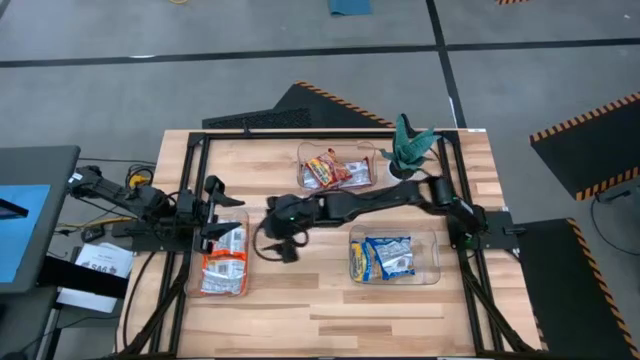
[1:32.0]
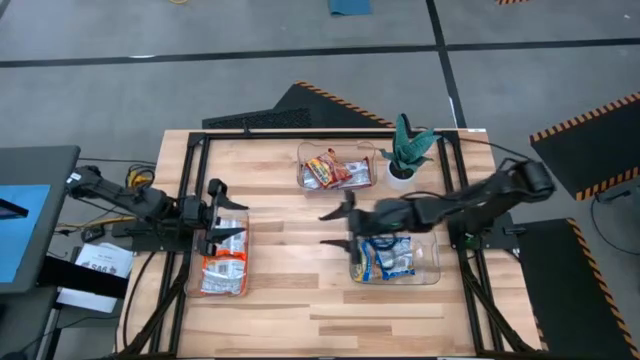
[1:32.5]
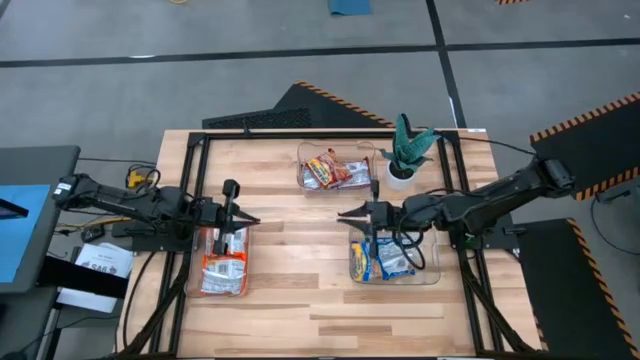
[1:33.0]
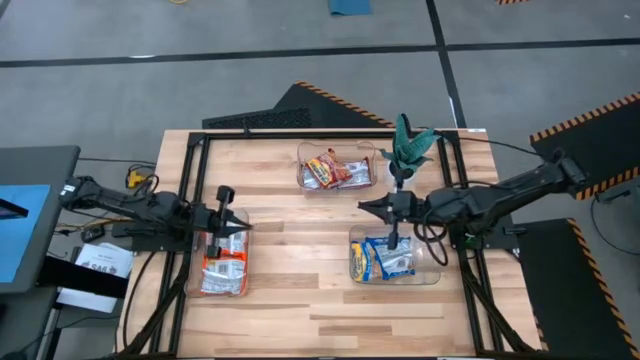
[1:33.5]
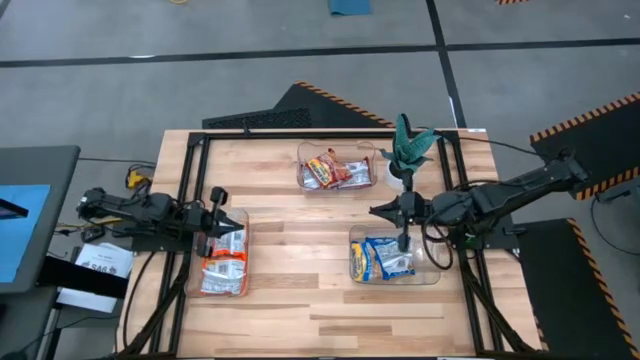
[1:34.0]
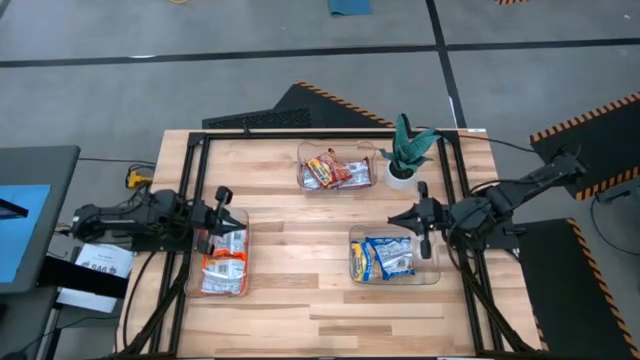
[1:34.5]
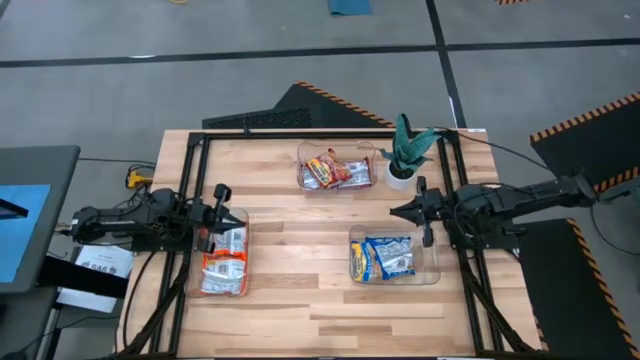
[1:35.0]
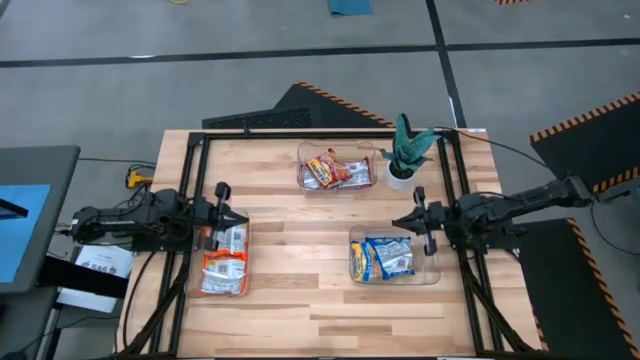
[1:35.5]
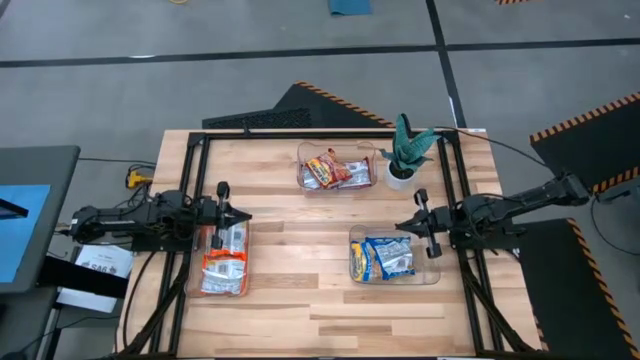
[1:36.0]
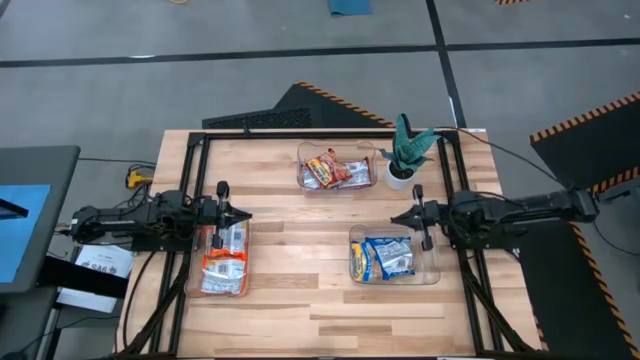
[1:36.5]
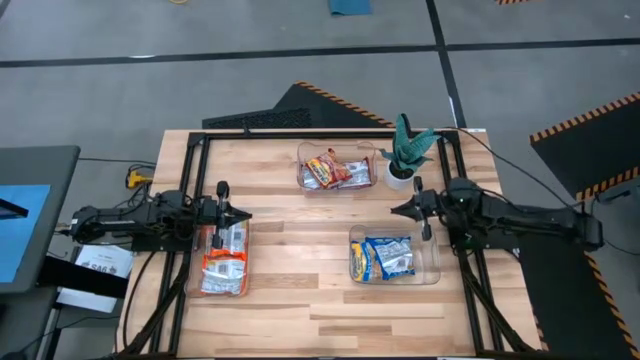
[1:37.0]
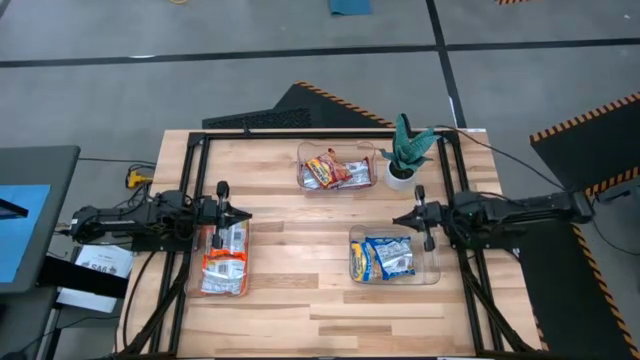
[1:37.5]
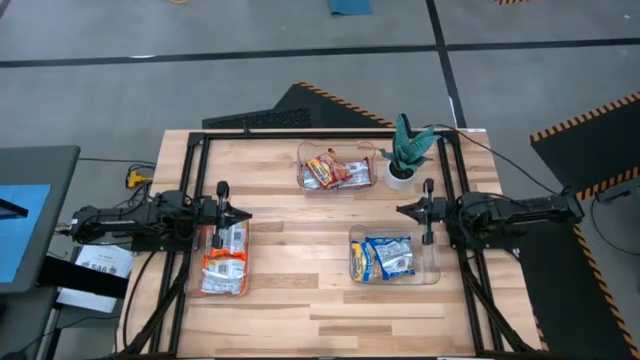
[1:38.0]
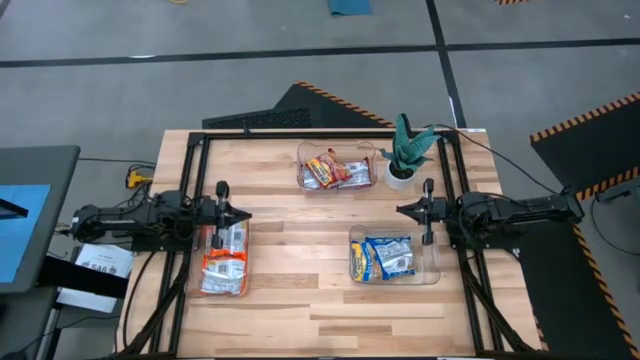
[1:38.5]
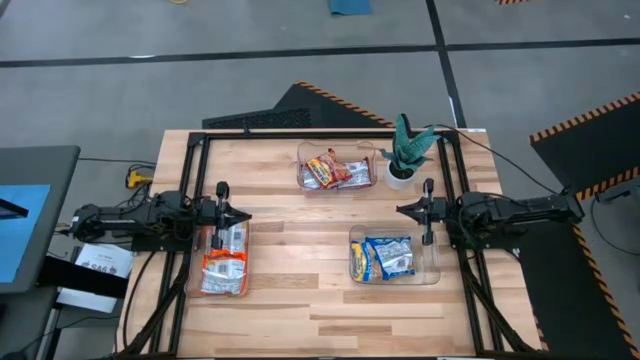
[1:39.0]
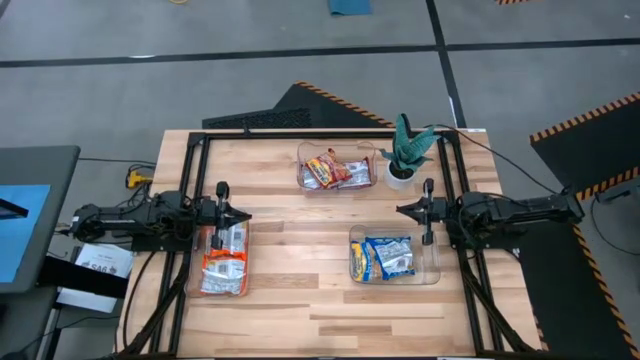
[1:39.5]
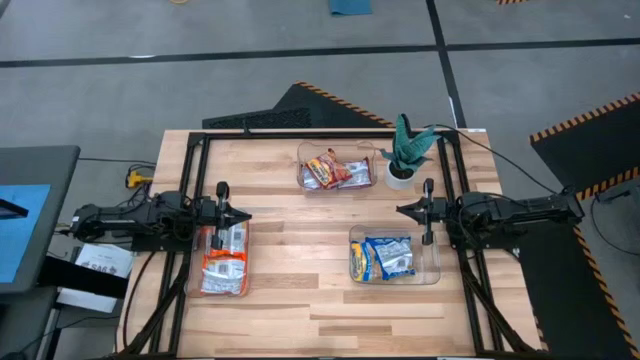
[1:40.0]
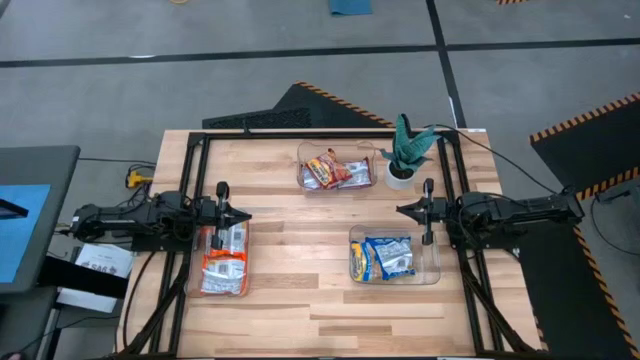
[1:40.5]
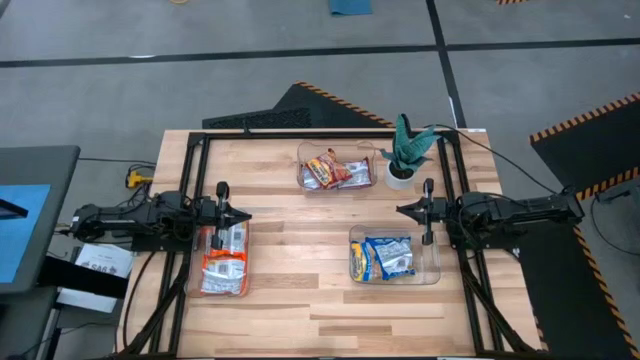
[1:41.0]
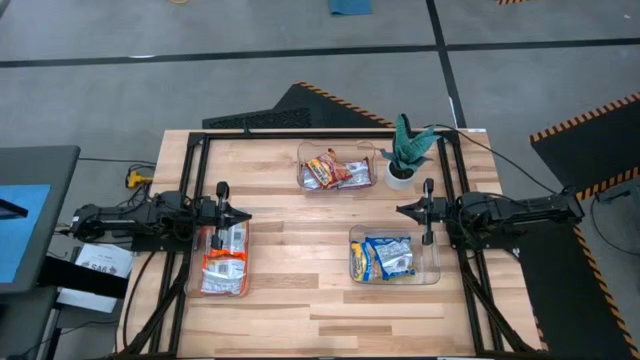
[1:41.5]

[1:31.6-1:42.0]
Task: Sort Maruchan noodles
Return to Home Position

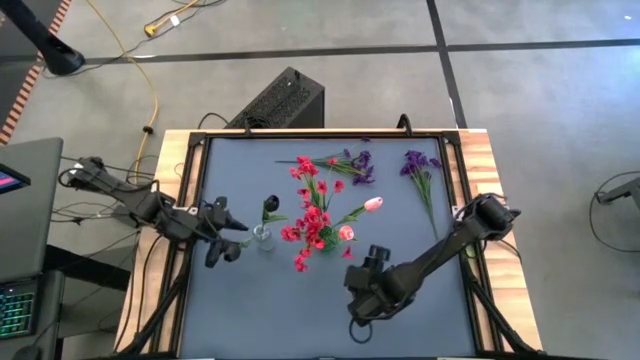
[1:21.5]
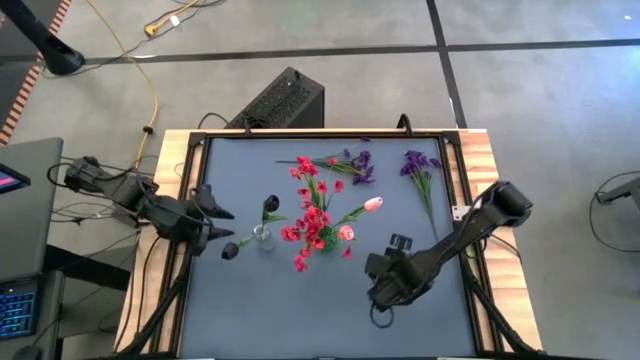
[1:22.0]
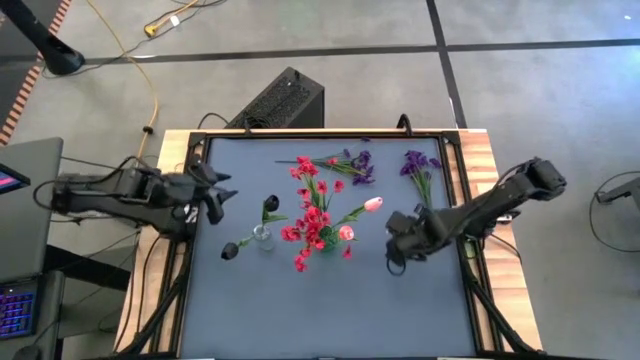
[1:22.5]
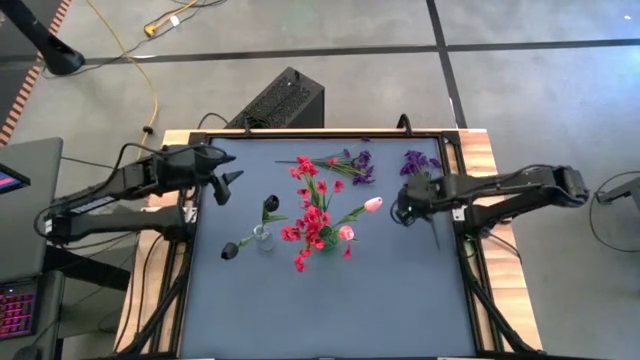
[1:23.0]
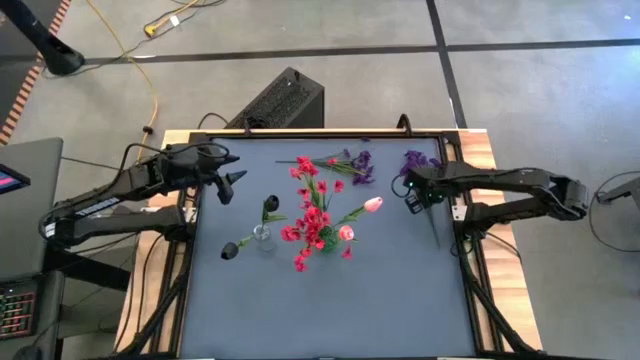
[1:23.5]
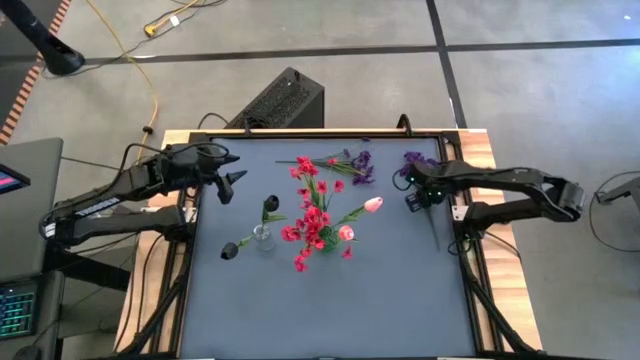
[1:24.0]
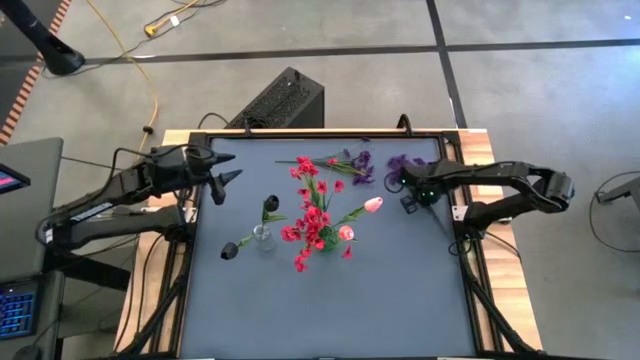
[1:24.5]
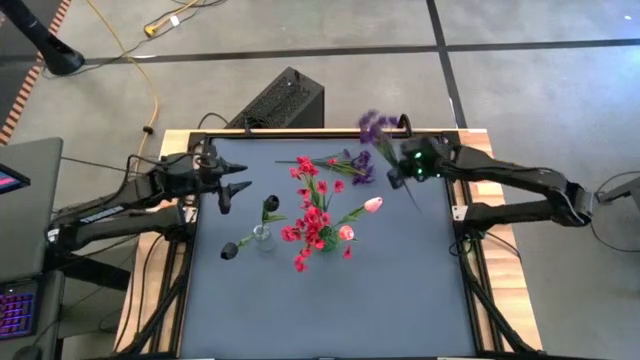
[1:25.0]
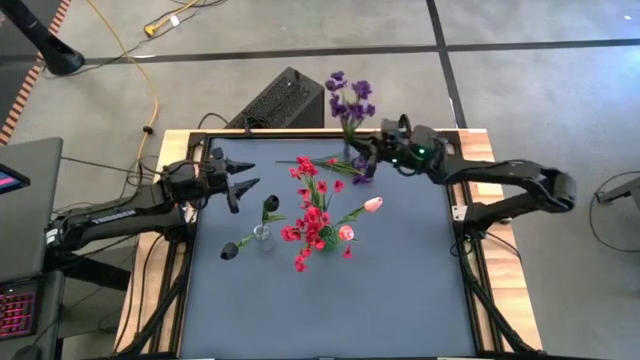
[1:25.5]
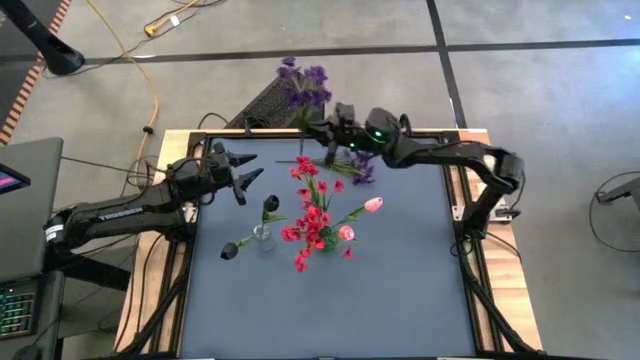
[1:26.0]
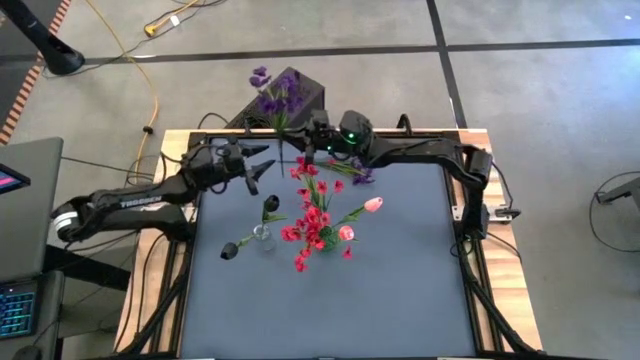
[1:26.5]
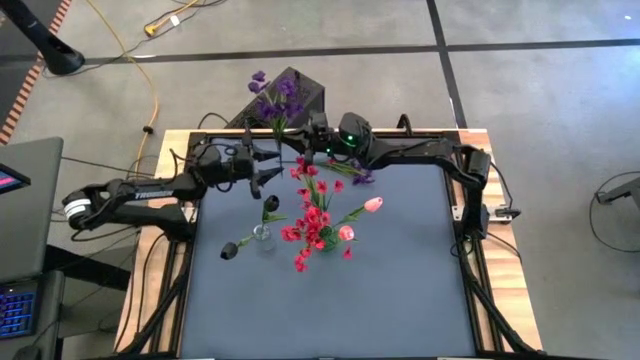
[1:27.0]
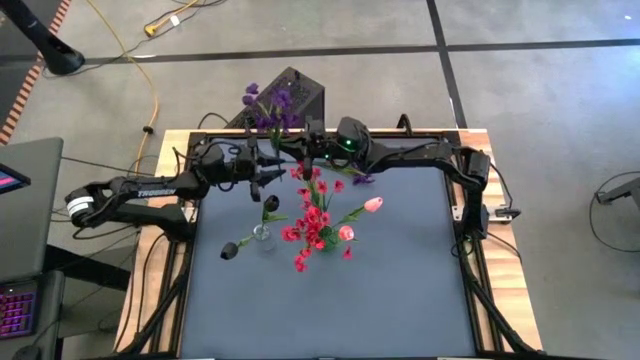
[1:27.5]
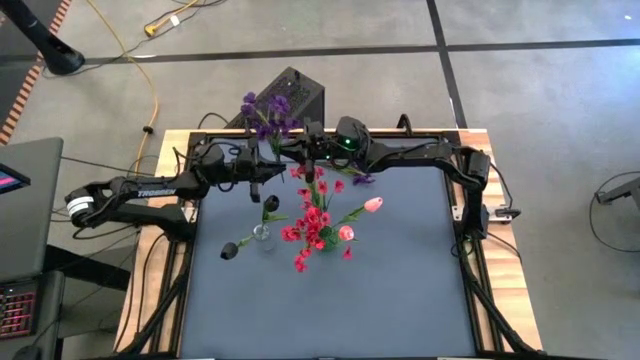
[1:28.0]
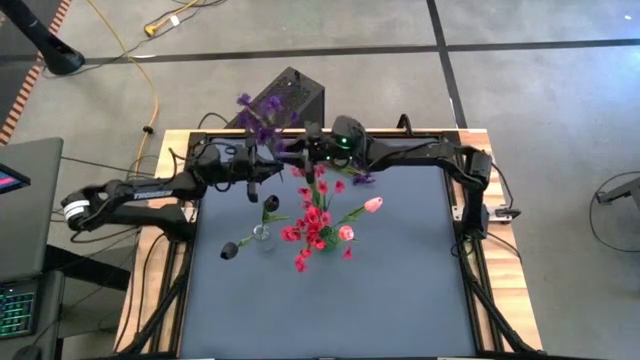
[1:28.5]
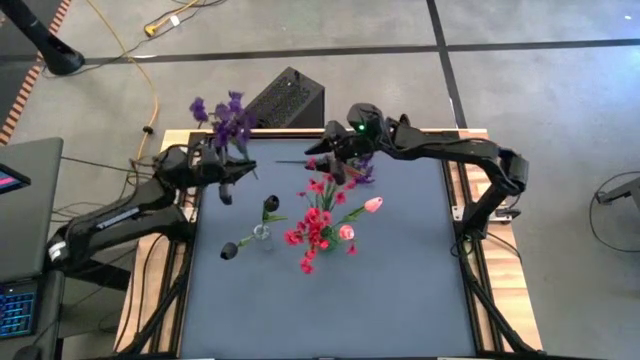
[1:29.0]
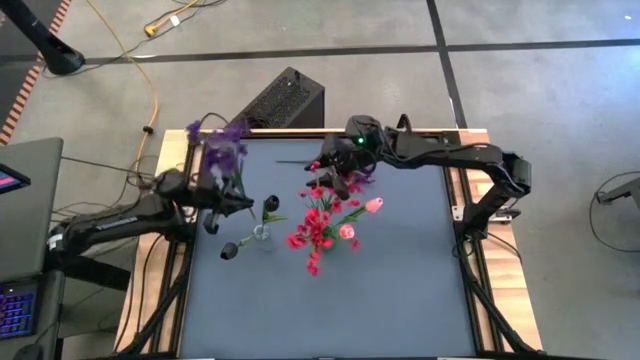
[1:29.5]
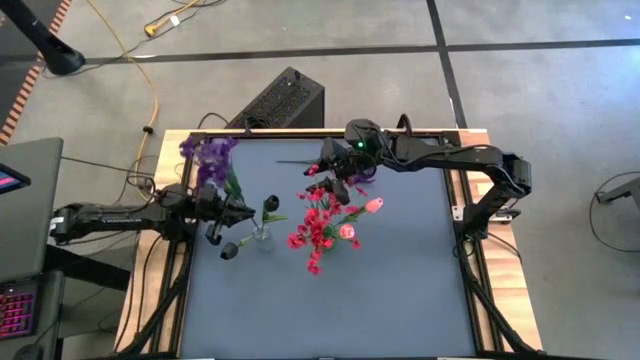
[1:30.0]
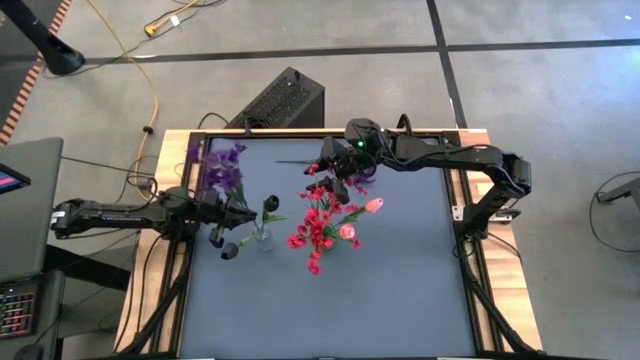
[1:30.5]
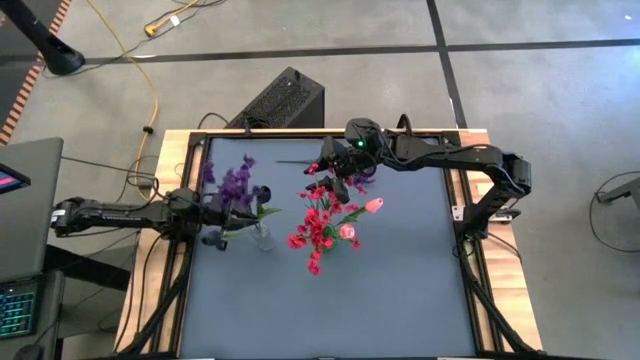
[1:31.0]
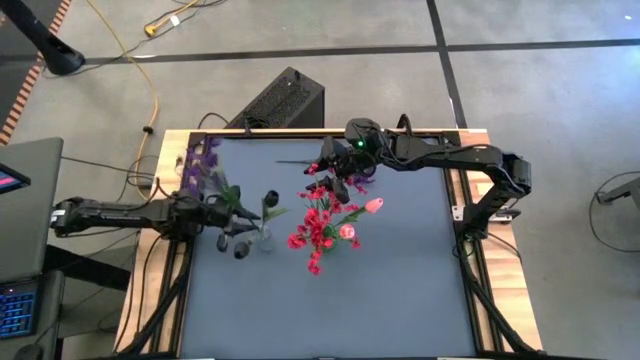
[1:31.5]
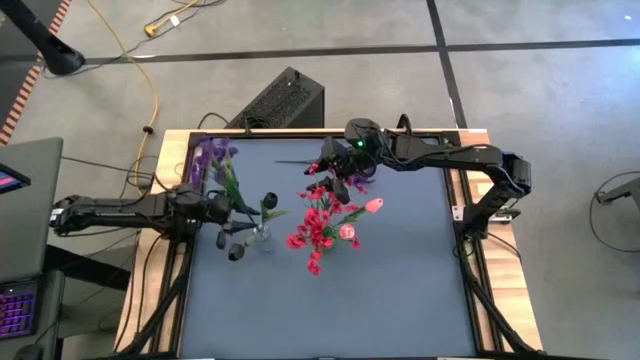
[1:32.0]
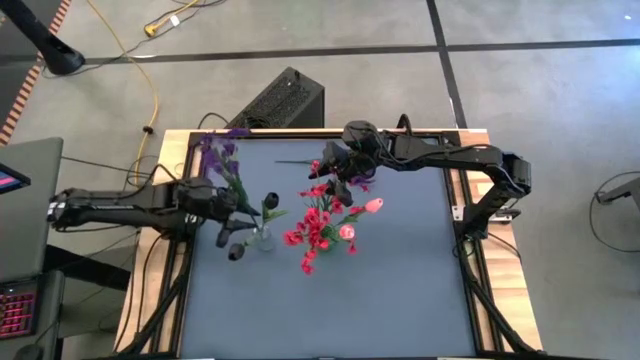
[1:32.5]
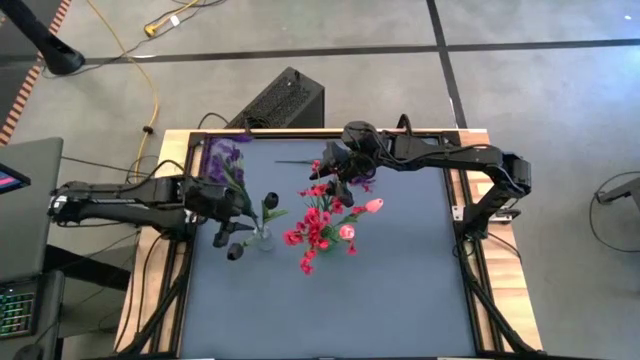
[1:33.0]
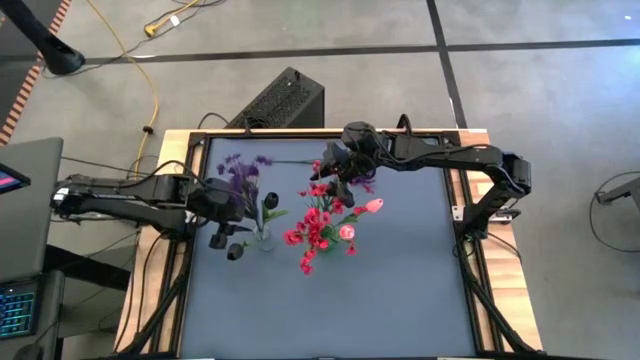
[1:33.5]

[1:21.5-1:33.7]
Task: Sort flowers into vase by color
Put the right violet flowers into the transparent vase
